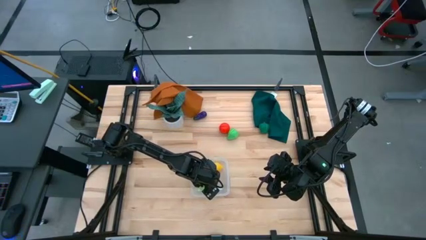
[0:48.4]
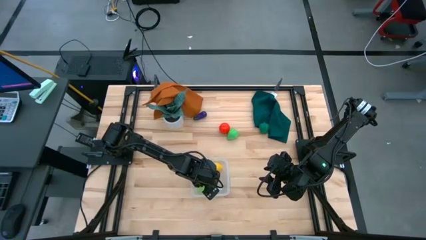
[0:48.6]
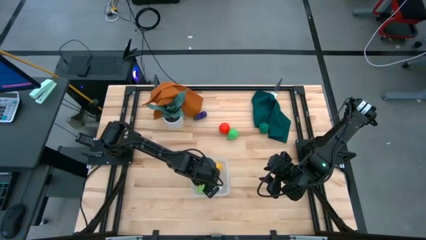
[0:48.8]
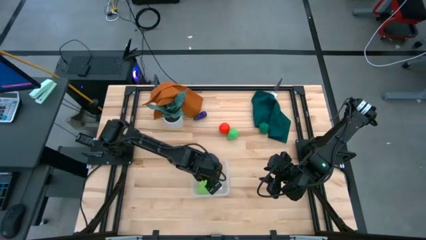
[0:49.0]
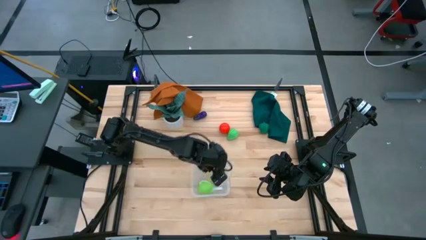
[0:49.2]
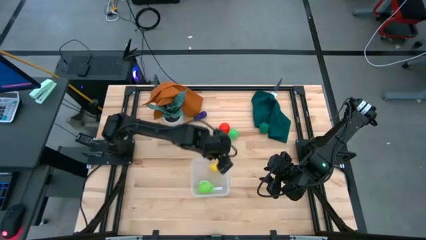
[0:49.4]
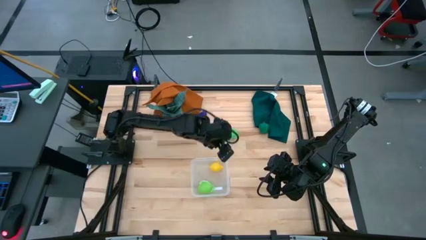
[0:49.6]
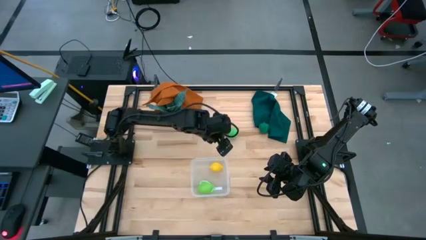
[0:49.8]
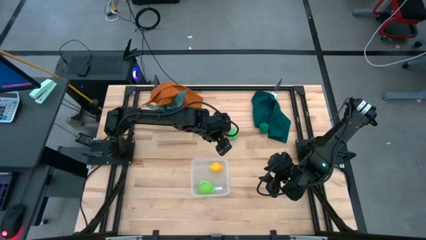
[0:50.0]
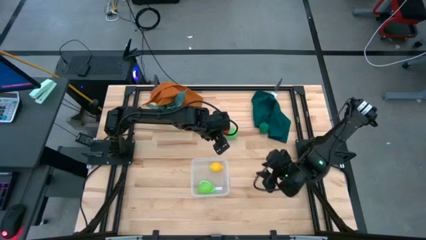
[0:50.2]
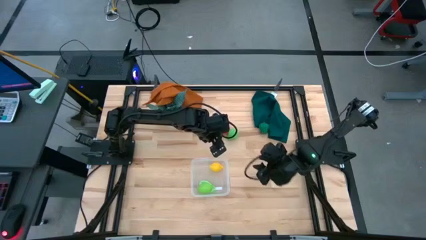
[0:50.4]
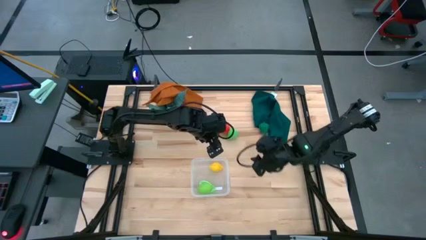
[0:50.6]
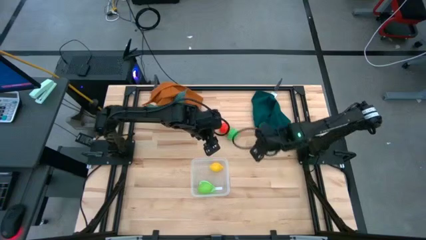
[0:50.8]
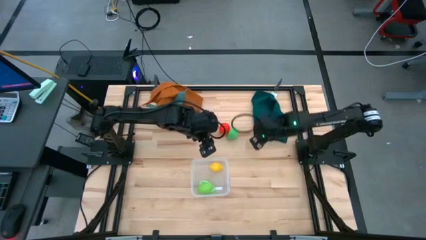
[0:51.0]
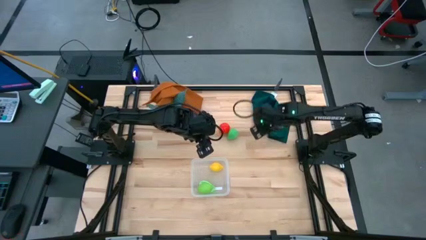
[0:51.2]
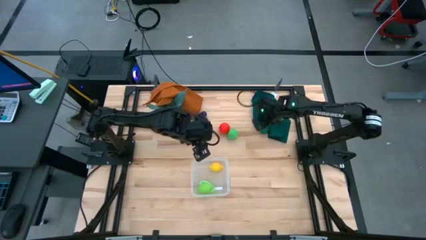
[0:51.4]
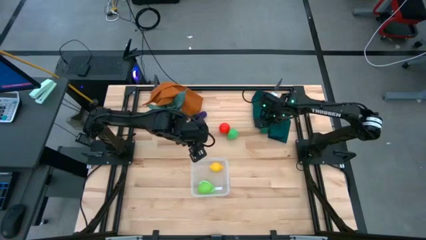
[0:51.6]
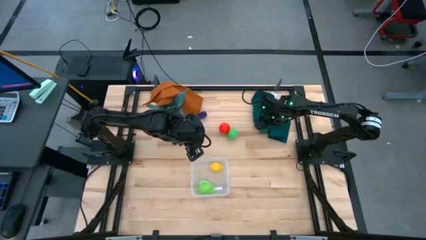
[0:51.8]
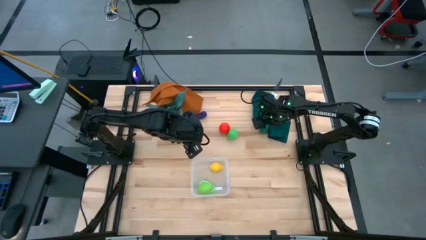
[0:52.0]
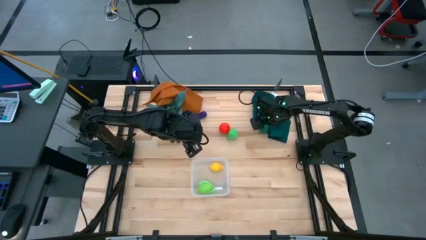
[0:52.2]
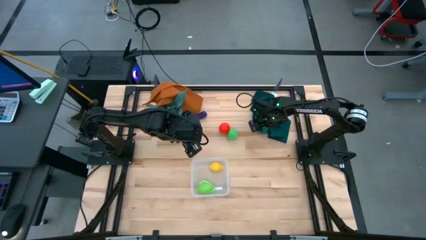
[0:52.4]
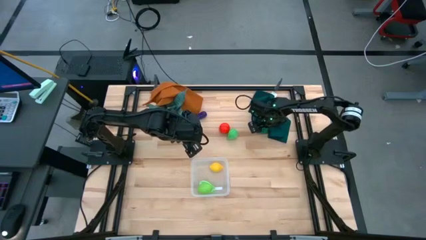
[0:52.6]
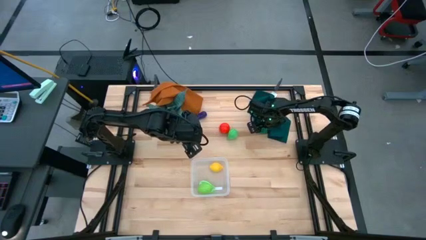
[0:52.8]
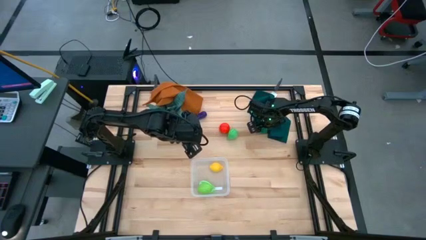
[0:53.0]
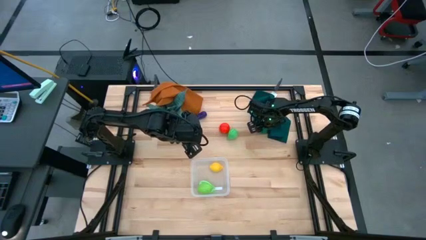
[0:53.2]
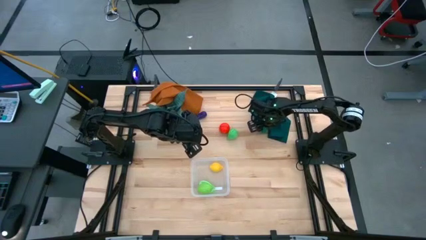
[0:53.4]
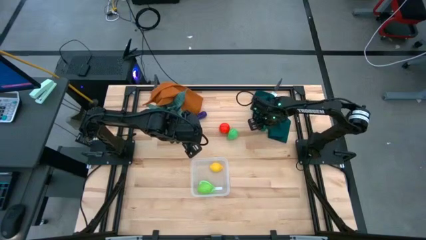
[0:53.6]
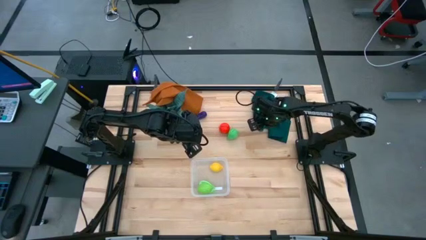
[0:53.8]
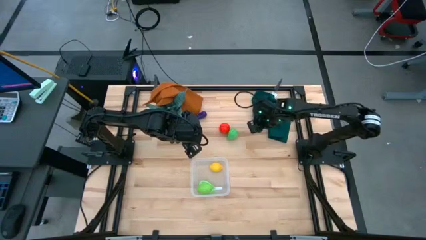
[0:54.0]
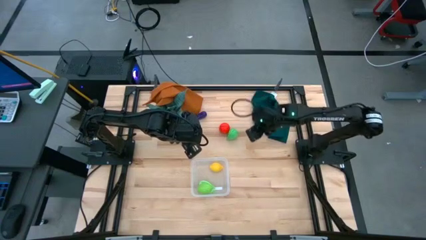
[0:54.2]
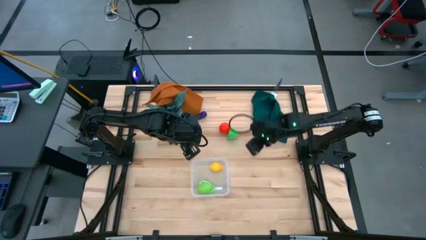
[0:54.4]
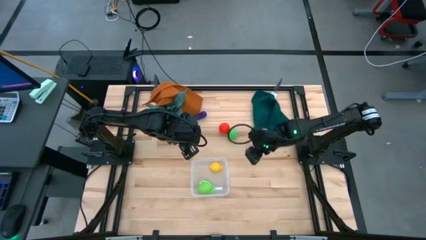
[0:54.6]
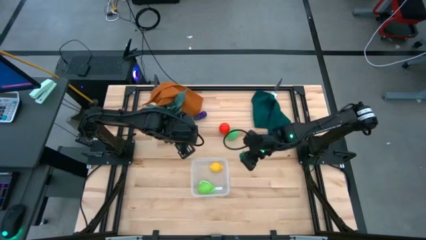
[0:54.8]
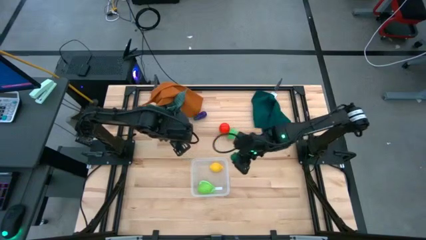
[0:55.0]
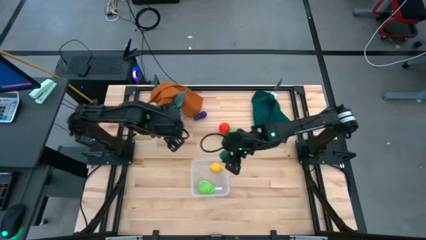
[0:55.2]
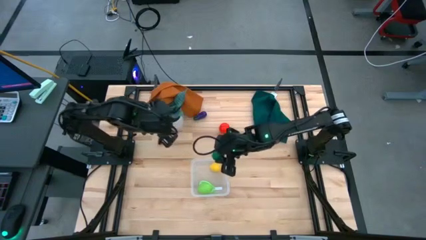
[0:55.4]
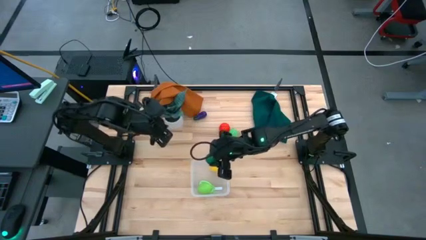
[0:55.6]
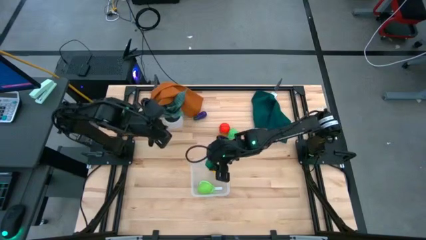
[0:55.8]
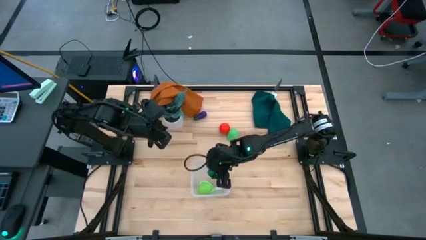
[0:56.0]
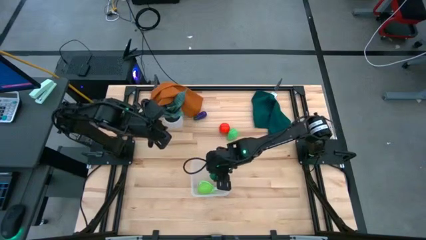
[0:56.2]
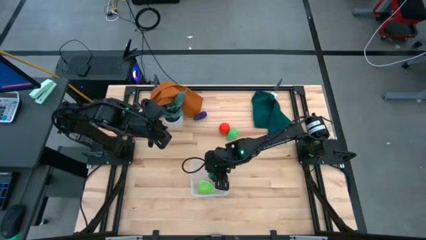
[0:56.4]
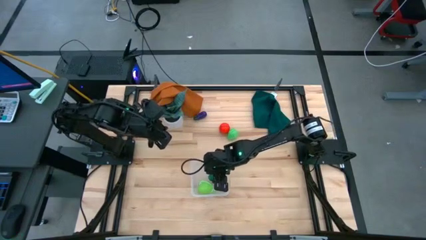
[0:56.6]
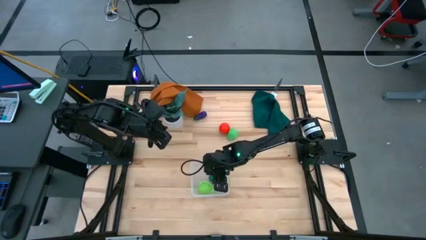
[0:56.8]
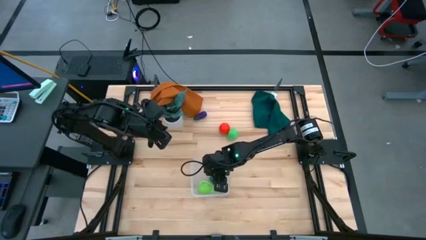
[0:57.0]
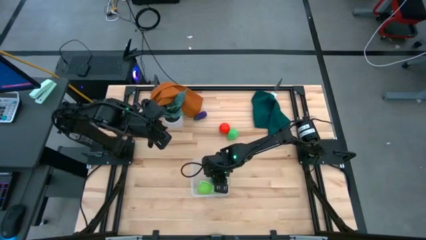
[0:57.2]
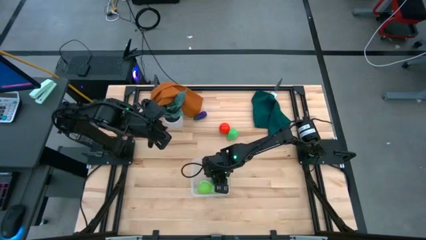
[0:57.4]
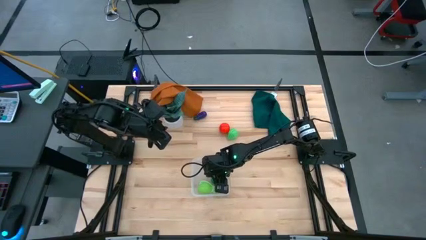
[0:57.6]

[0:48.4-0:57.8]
Task: Pick and placing Produce into tupperware
Put the bell pepper into the transparent bin

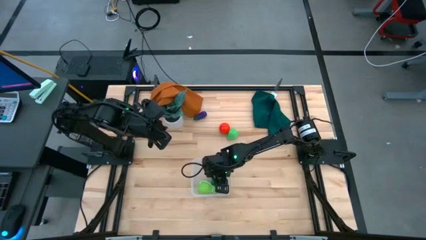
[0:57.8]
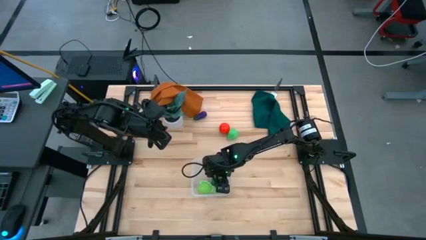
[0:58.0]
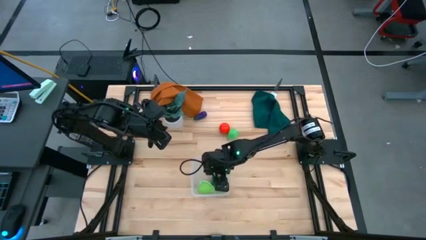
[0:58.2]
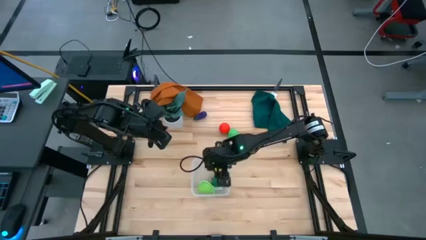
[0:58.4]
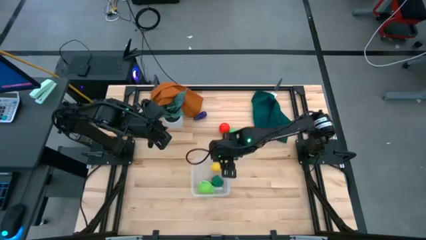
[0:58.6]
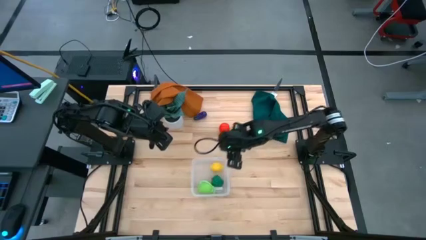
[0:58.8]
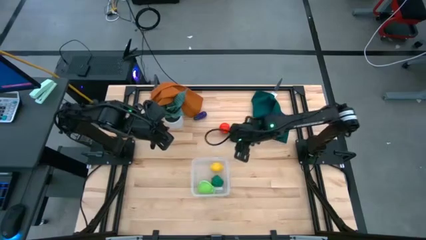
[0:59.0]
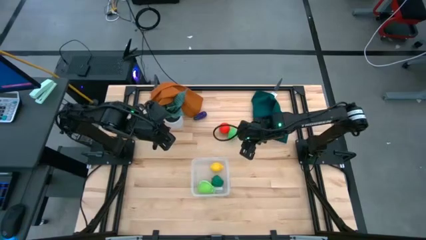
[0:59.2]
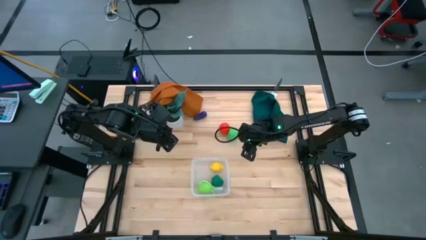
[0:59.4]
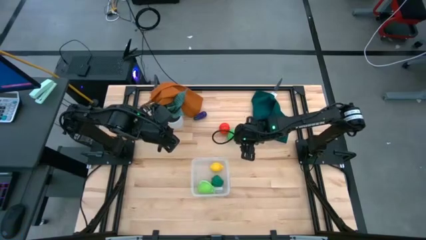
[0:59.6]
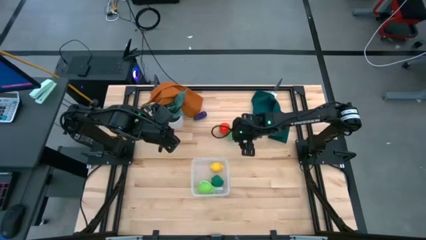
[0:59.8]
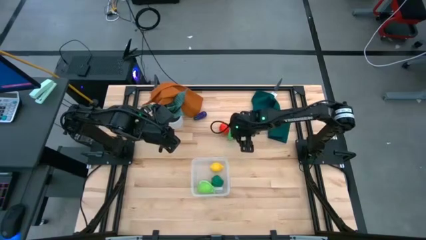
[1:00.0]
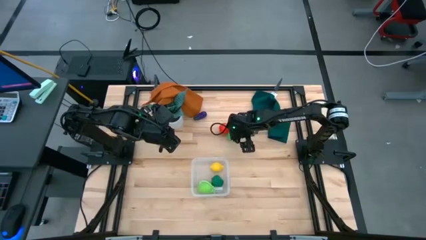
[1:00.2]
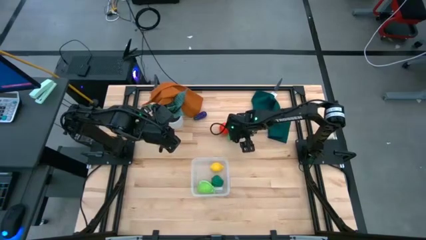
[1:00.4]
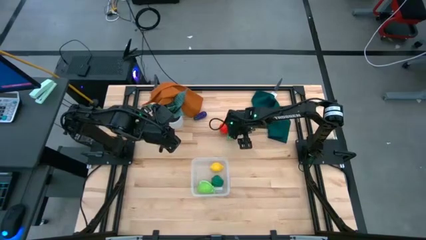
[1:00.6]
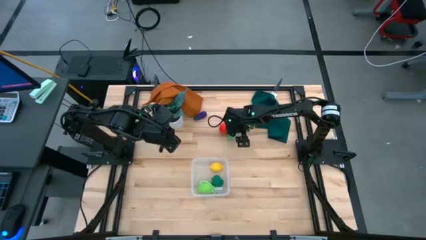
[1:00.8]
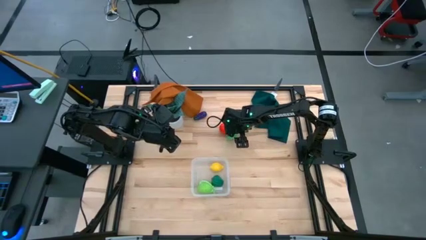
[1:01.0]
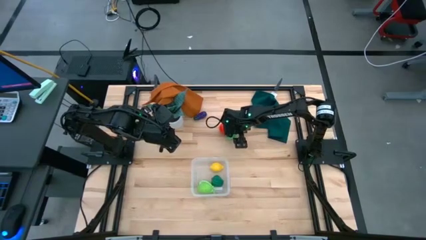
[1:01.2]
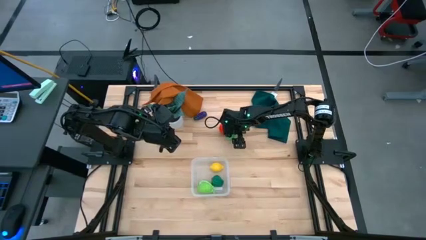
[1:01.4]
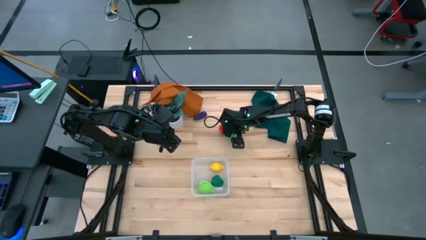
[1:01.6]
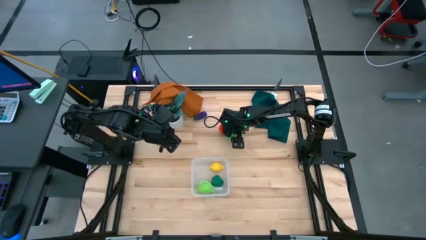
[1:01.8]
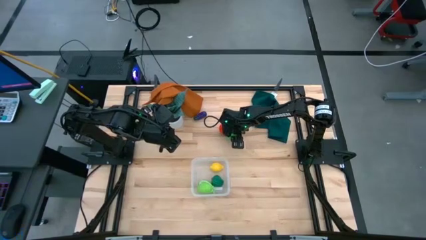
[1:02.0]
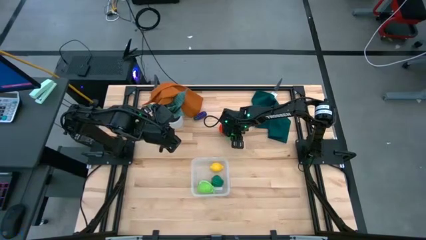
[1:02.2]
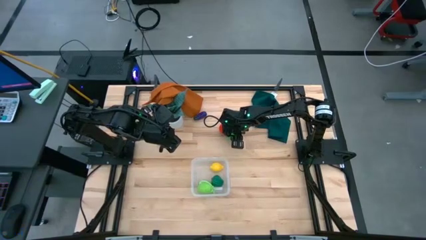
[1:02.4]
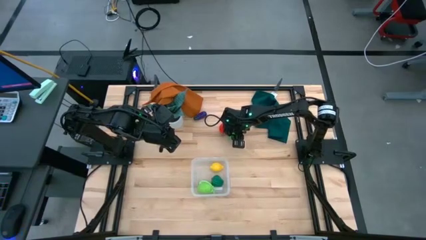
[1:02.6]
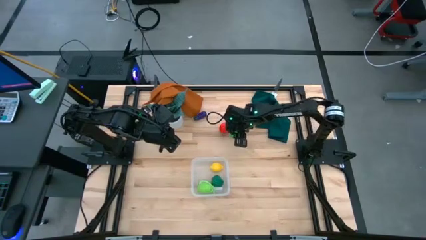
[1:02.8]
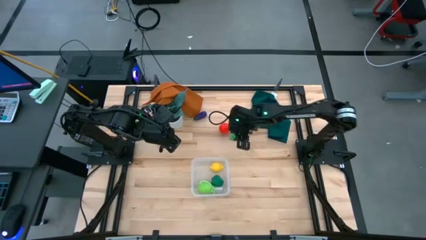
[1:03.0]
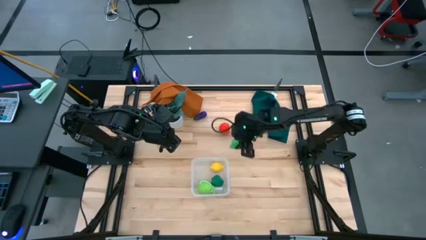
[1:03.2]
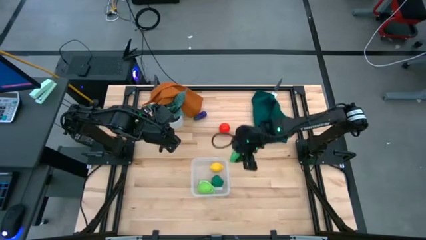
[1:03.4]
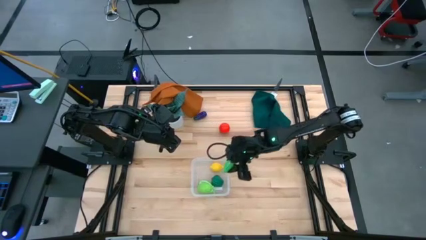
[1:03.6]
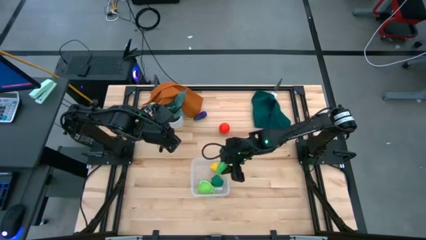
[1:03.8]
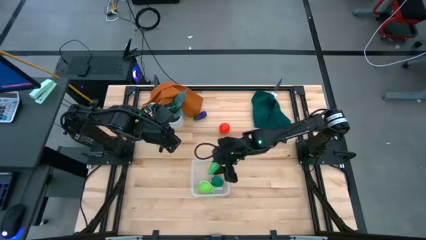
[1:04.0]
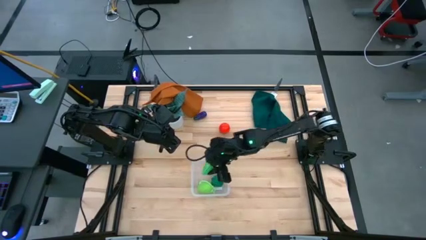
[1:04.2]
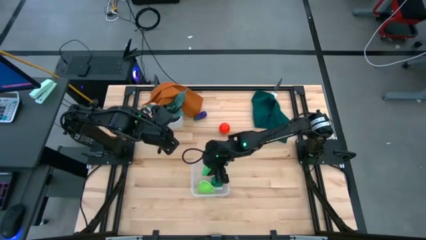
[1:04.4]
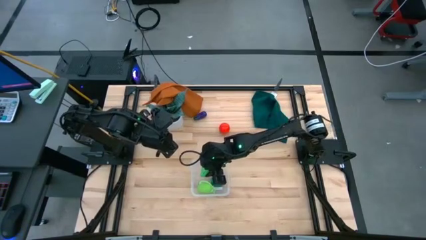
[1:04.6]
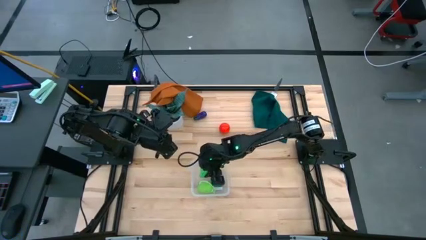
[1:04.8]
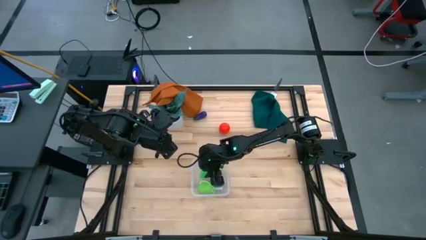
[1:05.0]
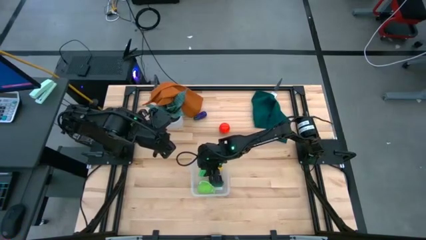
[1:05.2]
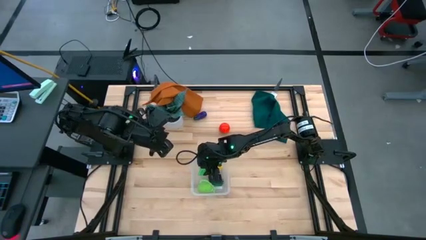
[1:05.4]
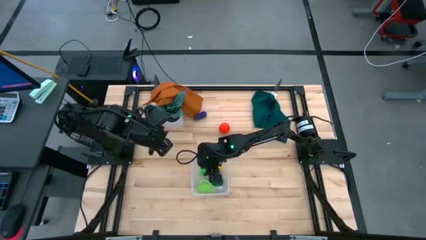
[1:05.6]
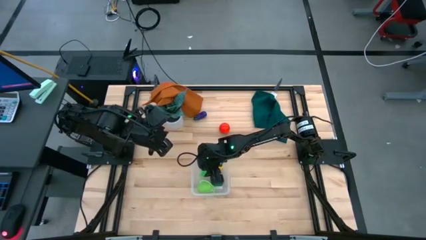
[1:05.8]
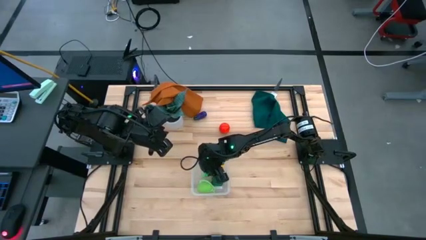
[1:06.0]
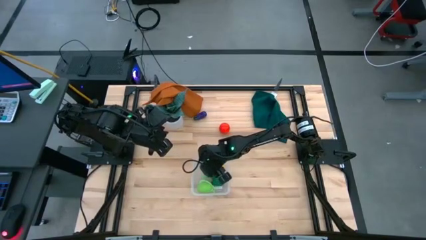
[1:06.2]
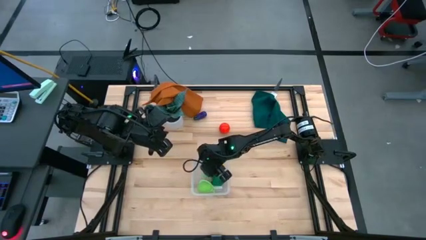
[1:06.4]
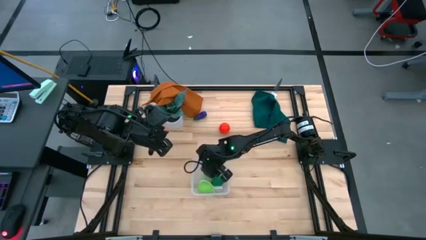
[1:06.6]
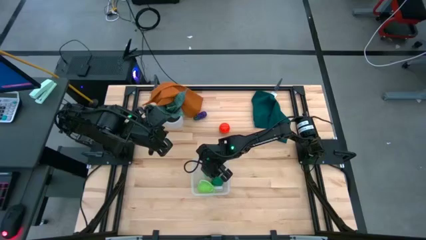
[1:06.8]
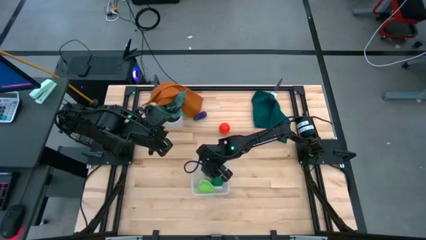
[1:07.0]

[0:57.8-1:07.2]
Put the pear into the transparent bin
